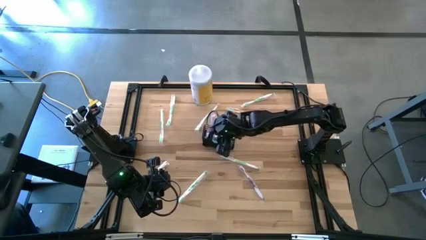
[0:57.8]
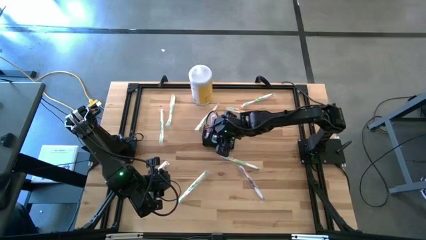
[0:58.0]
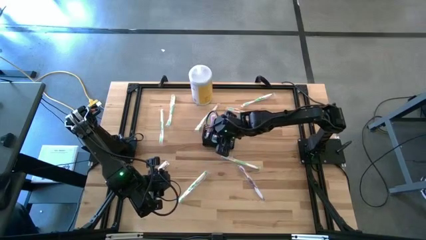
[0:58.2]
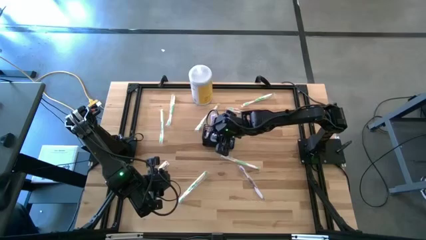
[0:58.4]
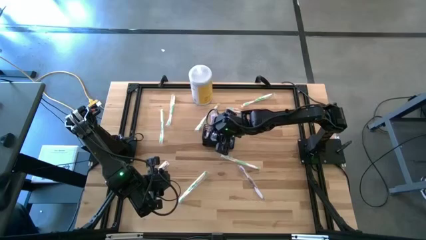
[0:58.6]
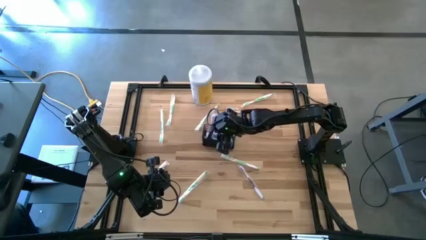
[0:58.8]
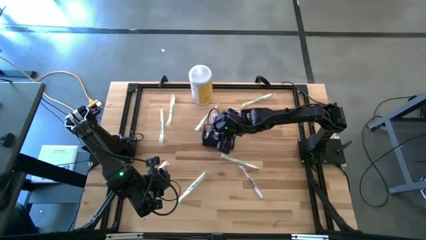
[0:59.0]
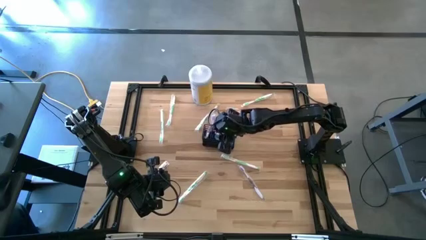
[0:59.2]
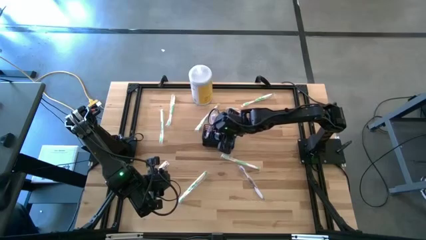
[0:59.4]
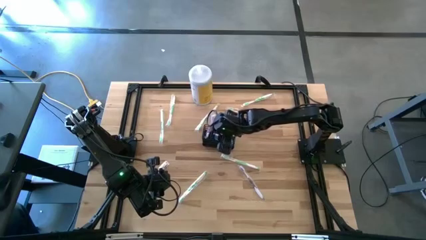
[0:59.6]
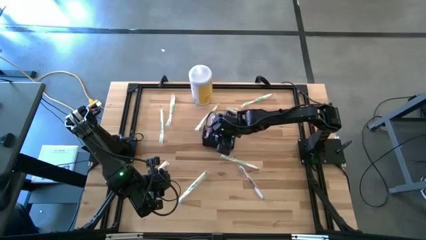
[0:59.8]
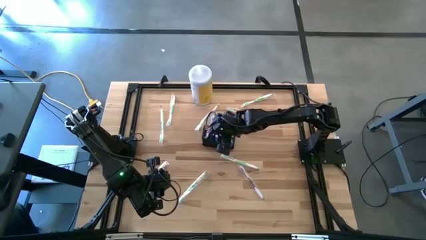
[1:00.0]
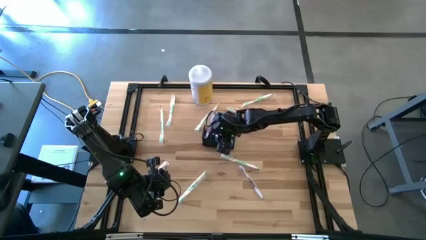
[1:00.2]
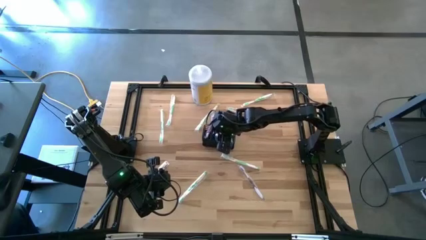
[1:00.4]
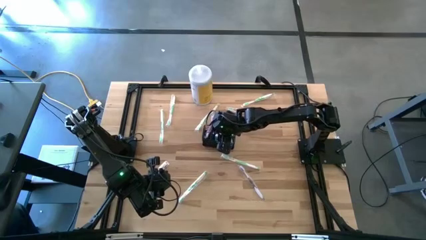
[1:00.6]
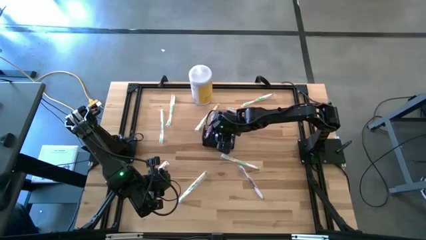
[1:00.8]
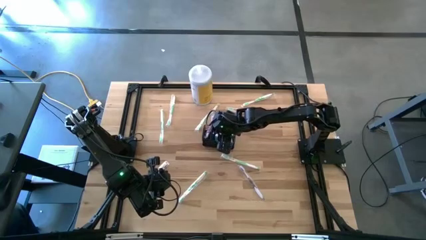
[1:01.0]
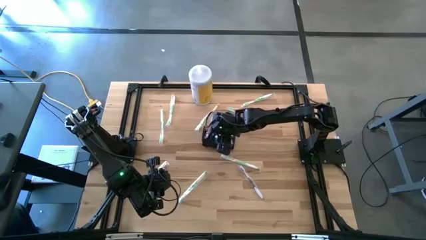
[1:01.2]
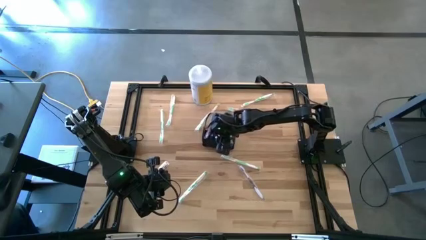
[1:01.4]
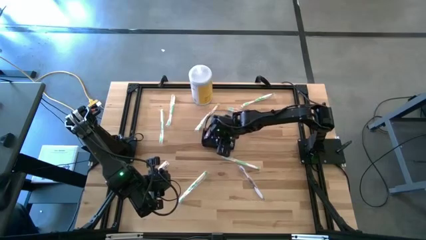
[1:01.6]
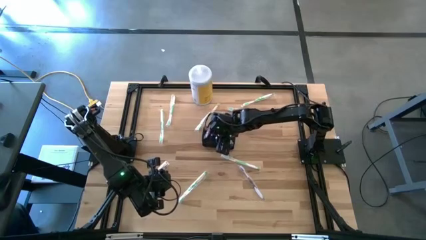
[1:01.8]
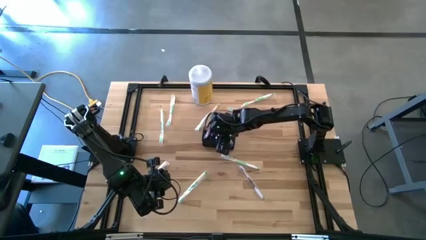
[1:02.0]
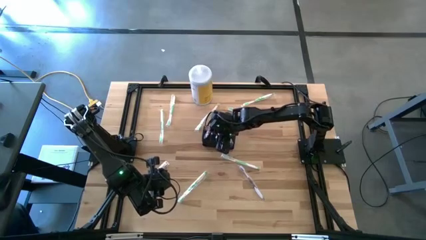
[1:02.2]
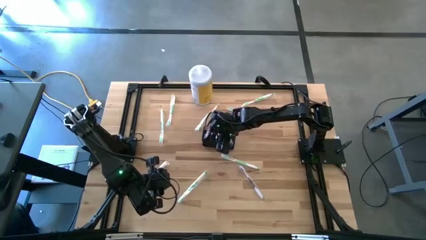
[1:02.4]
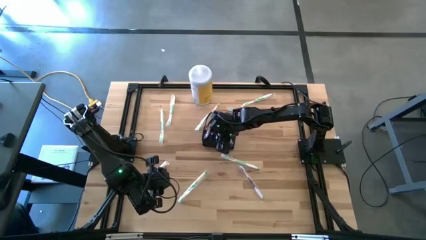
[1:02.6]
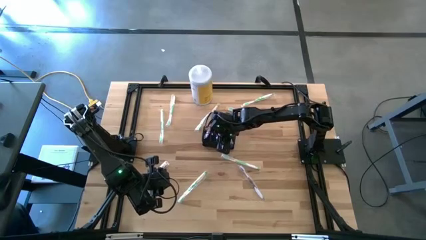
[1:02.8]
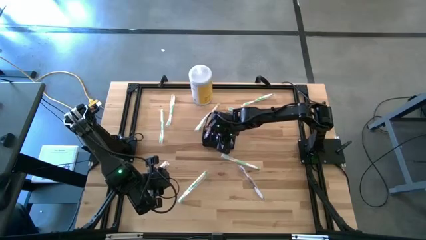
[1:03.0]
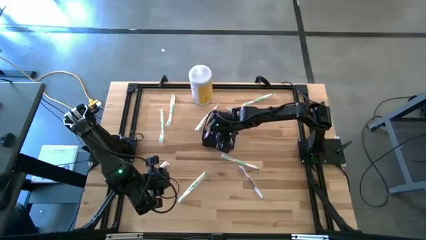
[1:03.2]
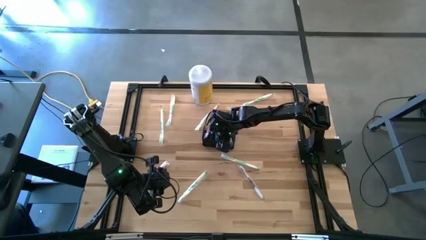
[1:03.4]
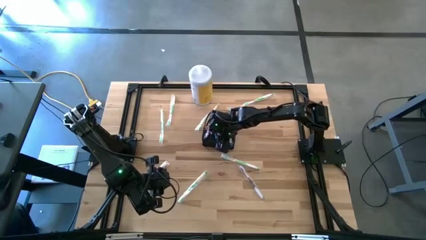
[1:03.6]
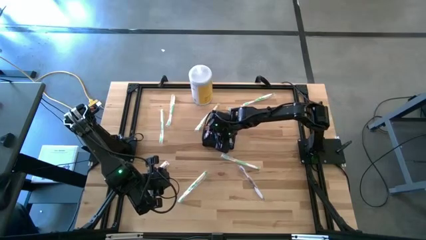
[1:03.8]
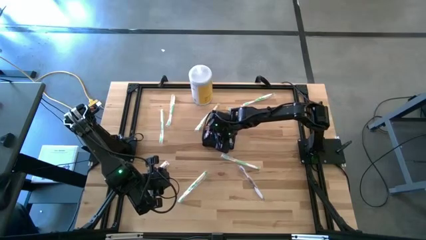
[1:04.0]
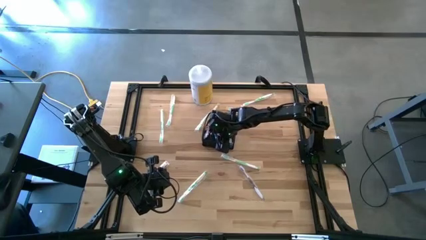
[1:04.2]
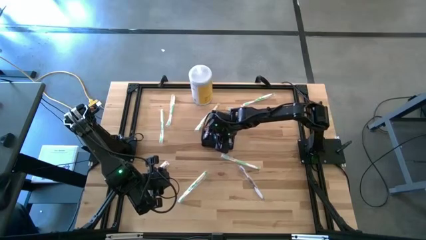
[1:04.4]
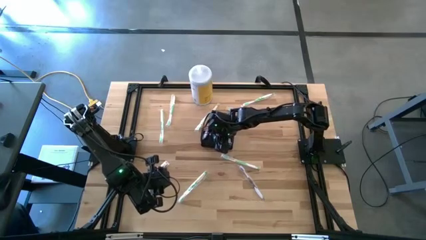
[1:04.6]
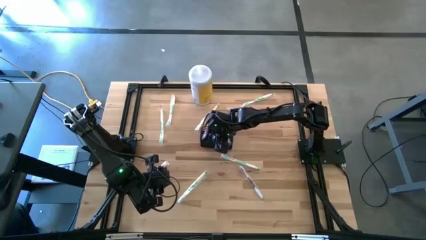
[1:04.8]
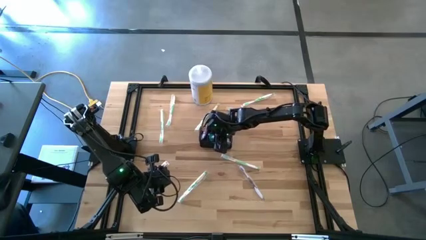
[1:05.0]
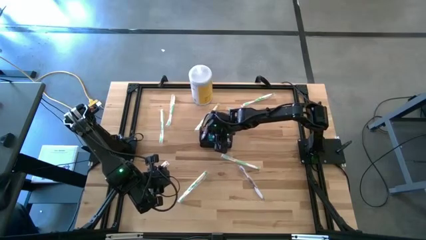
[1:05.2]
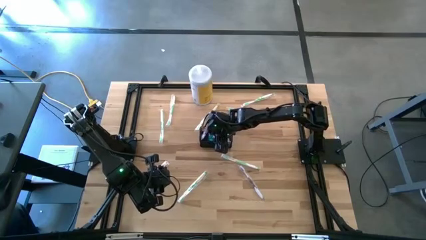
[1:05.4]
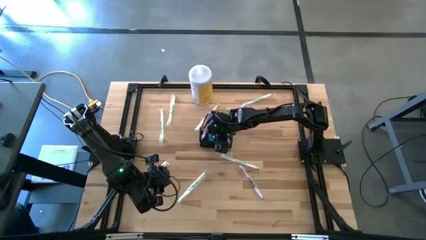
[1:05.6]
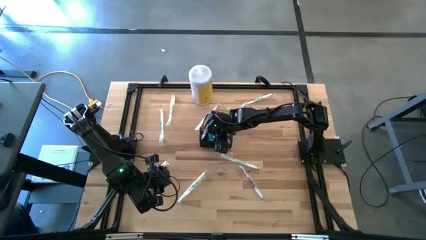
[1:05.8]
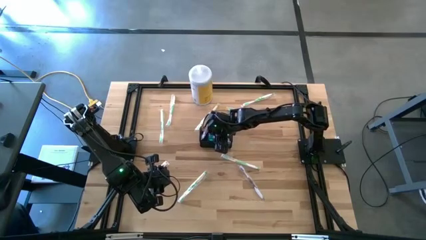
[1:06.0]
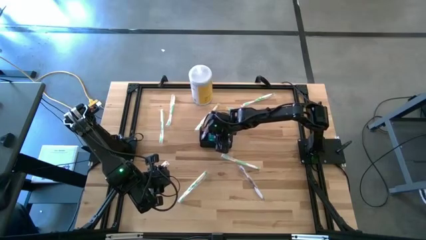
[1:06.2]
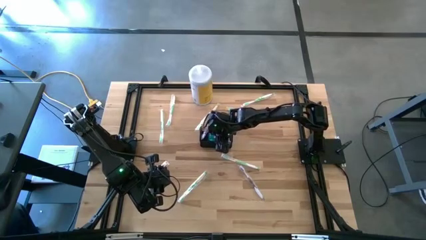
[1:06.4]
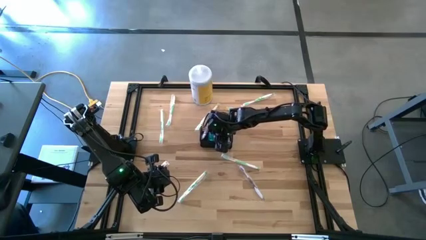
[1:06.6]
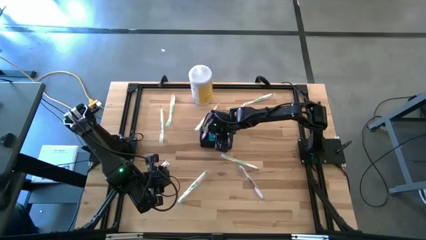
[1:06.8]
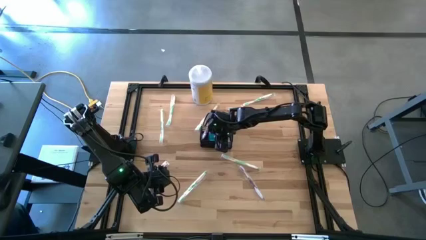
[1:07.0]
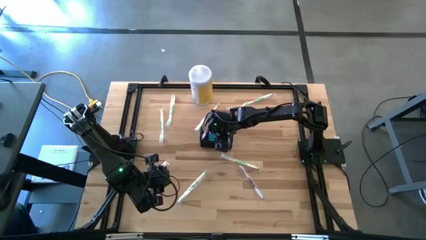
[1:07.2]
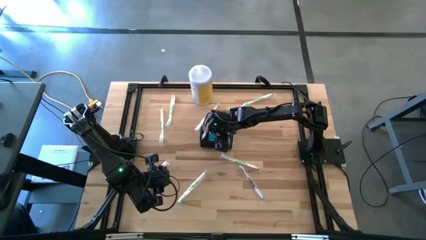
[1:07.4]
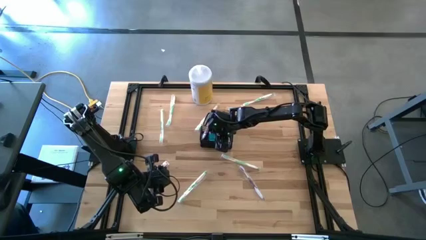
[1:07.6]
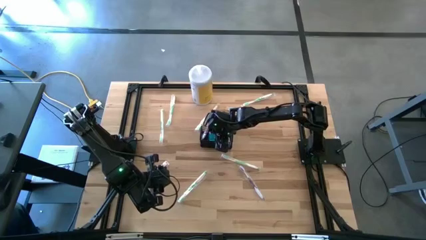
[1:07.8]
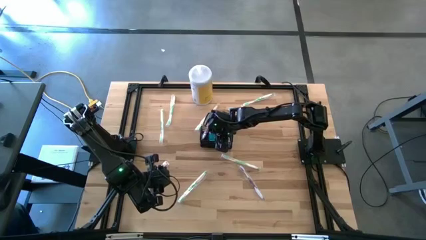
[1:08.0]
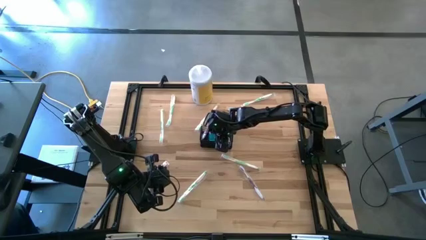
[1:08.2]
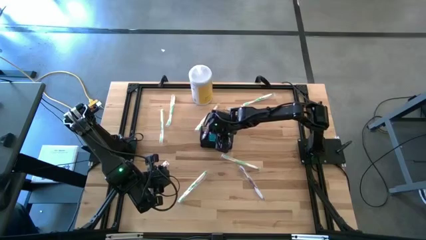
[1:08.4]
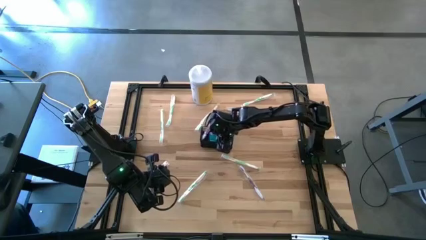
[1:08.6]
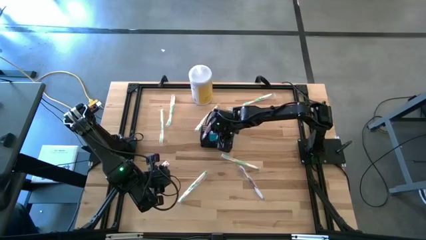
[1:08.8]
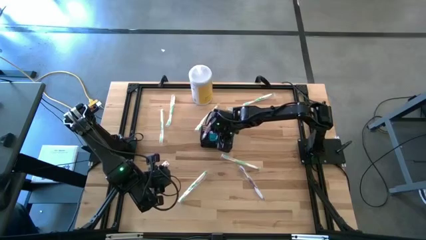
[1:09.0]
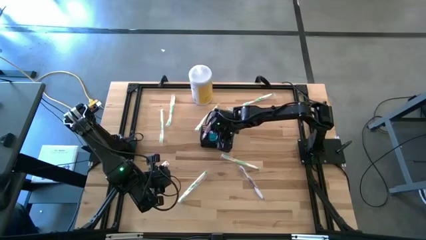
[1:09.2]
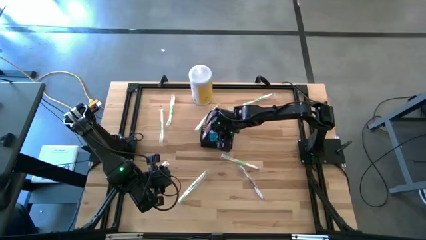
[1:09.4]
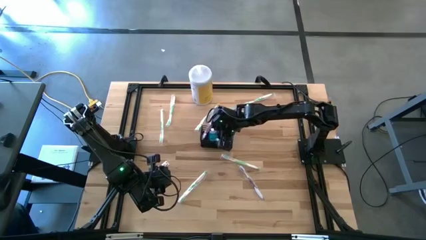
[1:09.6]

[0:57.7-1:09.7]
Task: Pick & Place toothbrushing station
Put the blue mouthwash into the middle section wire organizer

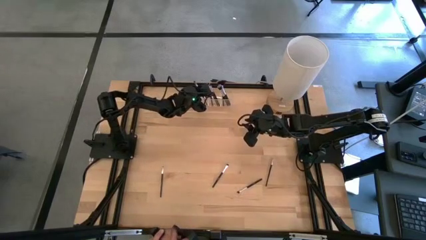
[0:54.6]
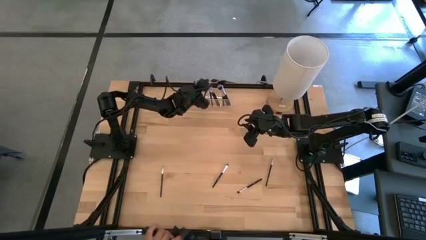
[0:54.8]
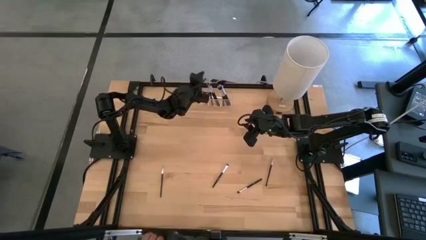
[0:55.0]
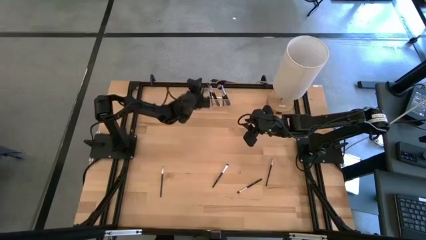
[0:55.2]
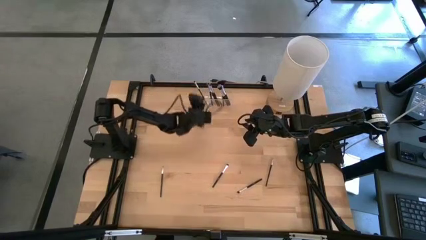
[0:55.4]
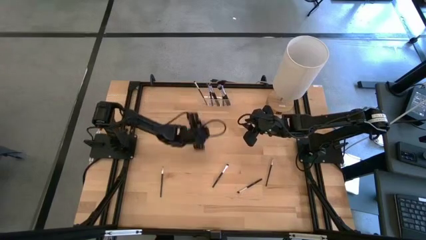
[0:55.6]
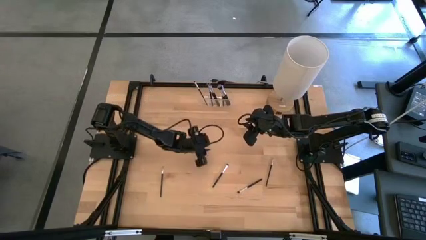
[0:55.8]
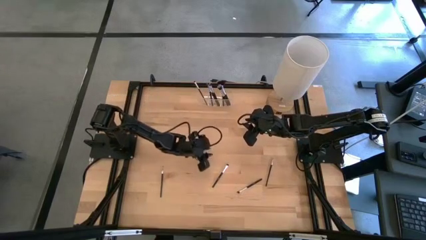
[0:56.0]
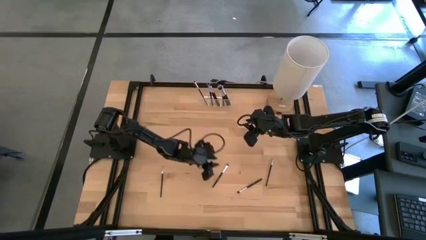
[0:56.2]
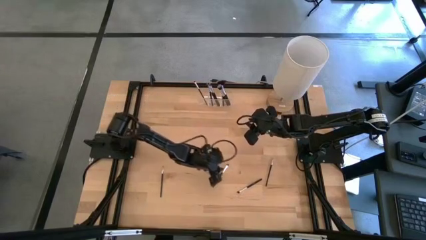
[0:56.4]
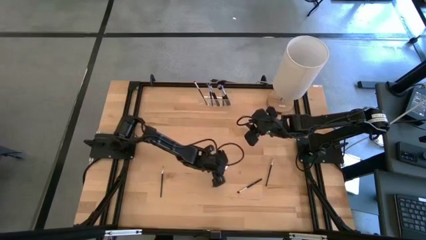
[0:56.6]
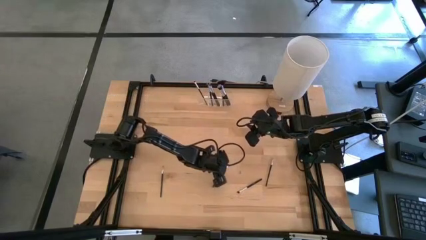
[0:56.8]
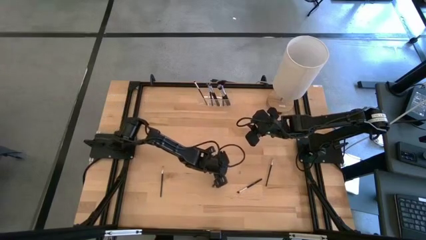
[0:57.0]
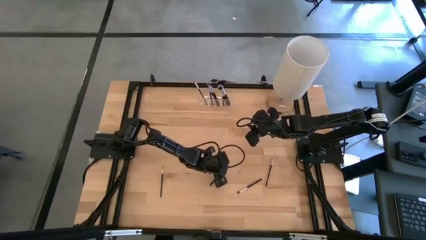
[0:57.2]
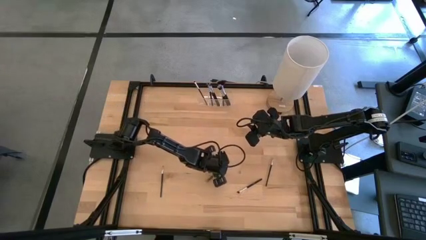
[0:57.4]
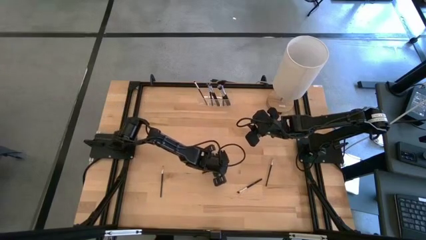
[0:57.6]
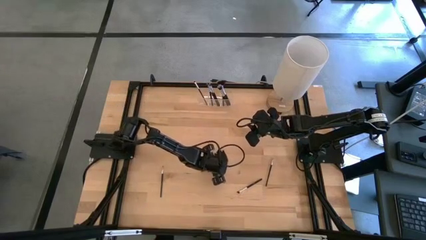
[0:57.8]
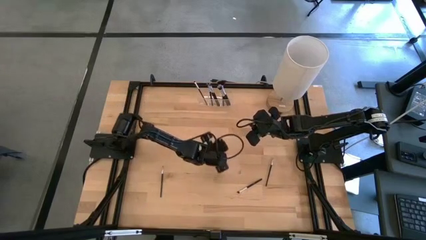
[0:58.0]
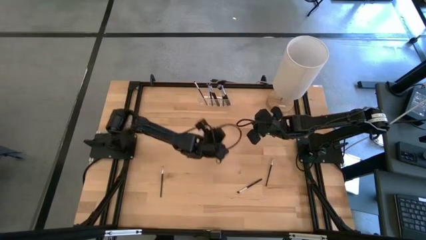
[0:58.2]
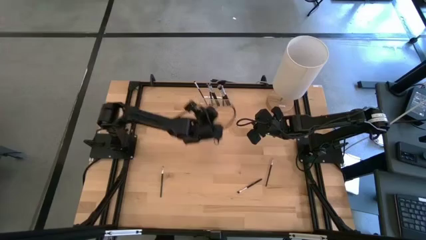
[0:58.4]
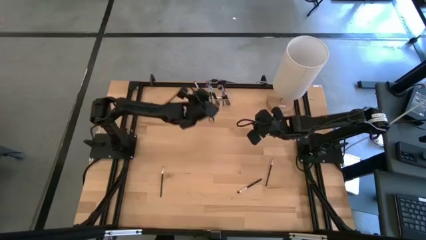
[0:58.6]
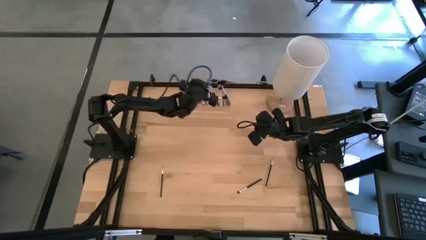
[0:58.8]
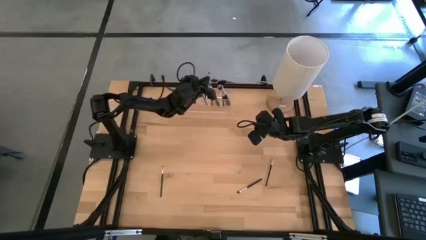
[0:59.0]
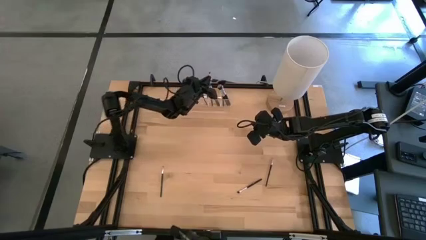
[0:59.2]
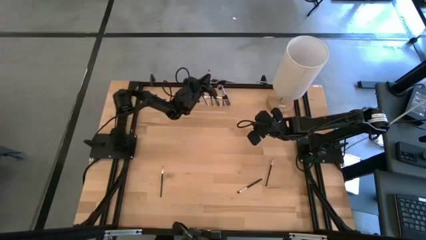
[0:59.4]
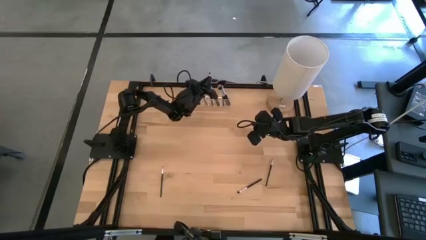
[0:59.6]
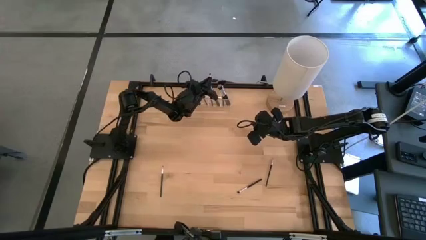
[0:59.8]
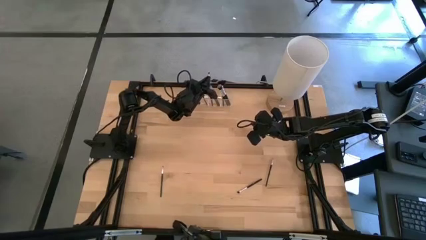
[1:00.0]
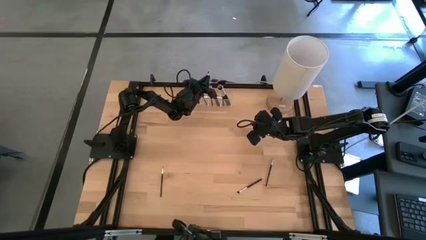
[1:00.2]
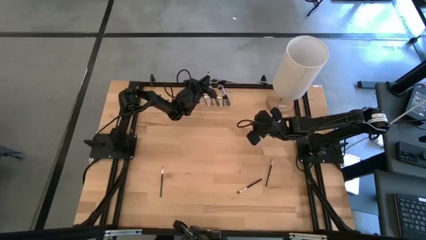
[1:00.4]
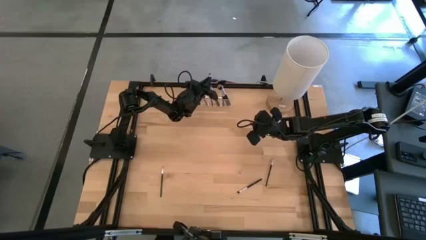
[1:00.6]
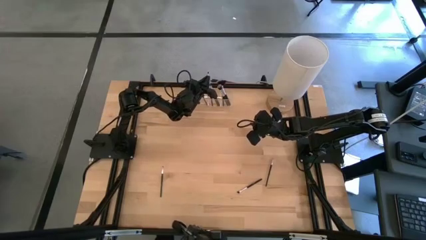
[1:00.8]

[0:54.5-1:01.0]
Task: Put items in baskets/containers
Put the black eyeshadow brush into the transparent organizer
